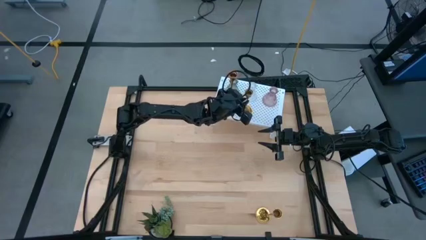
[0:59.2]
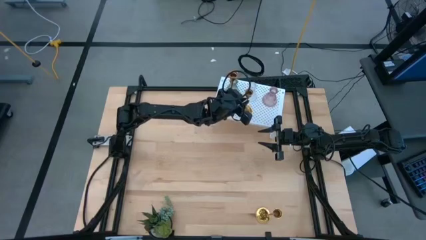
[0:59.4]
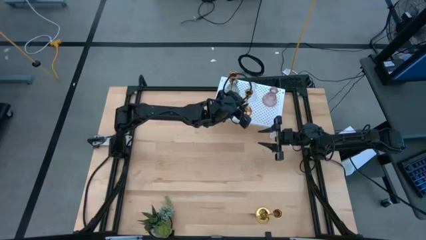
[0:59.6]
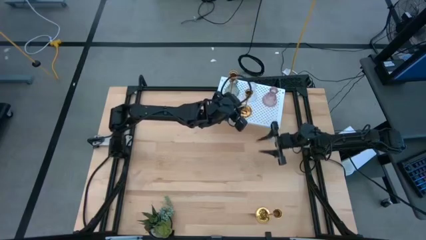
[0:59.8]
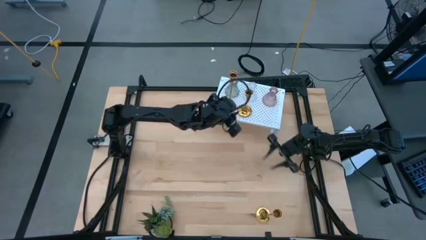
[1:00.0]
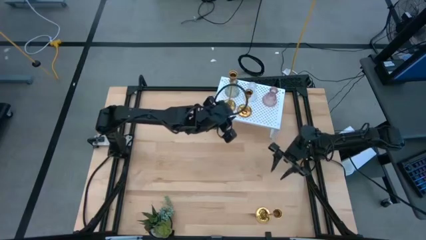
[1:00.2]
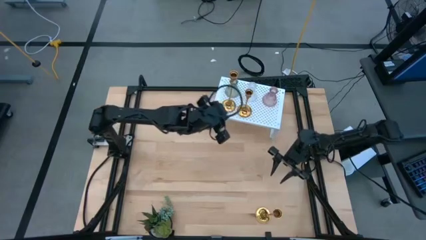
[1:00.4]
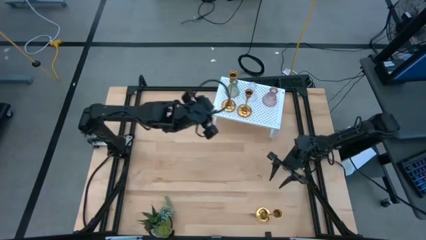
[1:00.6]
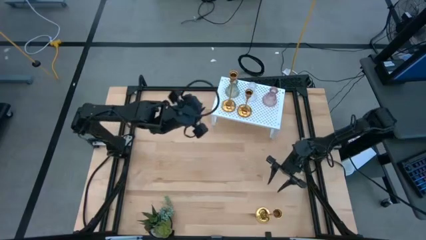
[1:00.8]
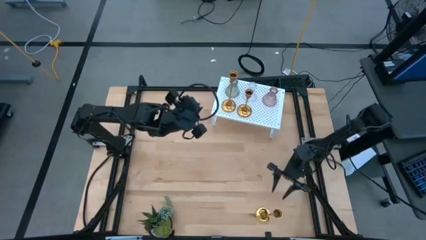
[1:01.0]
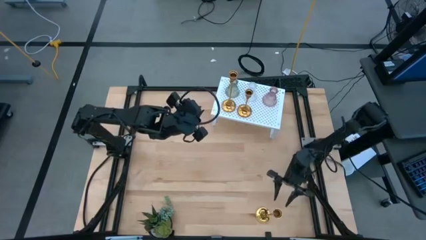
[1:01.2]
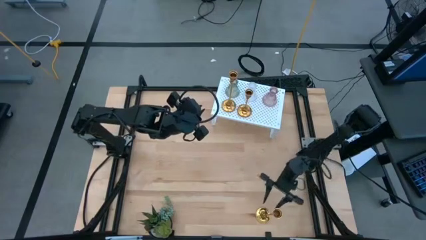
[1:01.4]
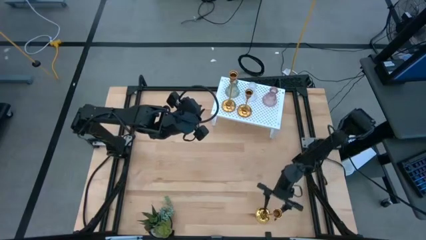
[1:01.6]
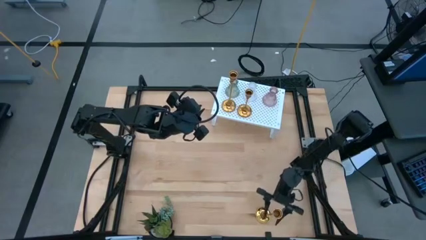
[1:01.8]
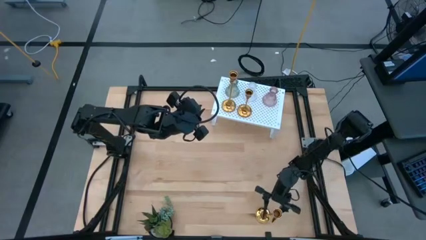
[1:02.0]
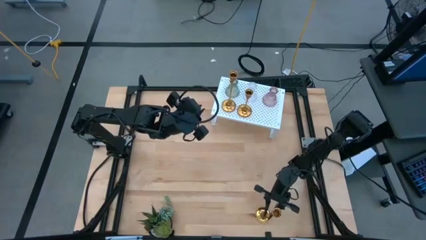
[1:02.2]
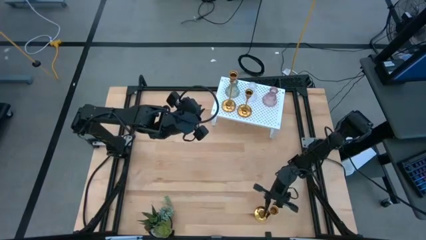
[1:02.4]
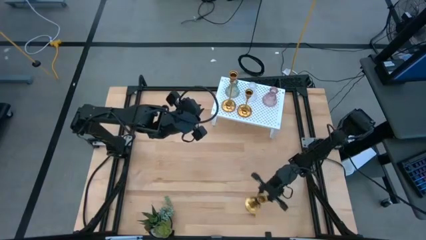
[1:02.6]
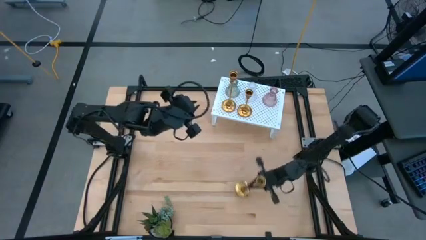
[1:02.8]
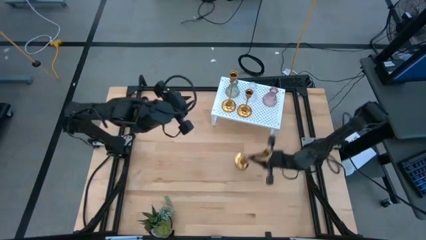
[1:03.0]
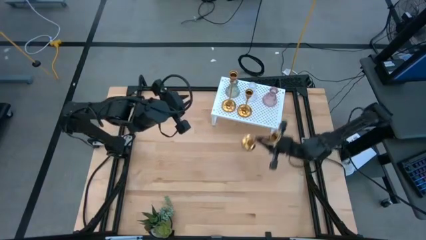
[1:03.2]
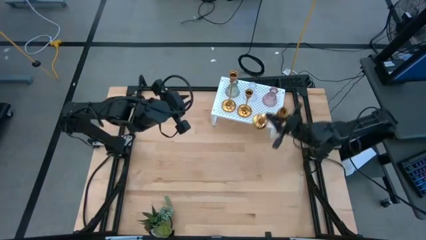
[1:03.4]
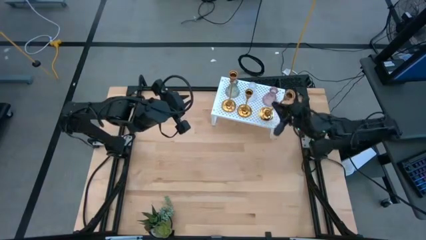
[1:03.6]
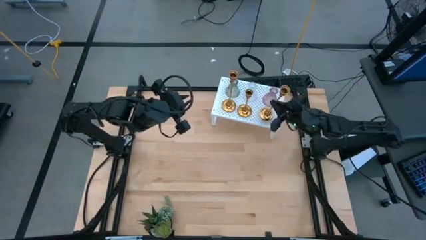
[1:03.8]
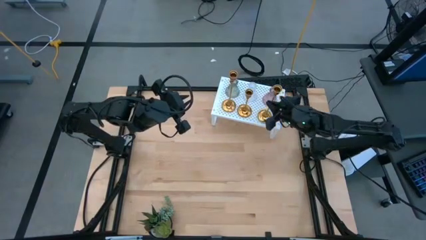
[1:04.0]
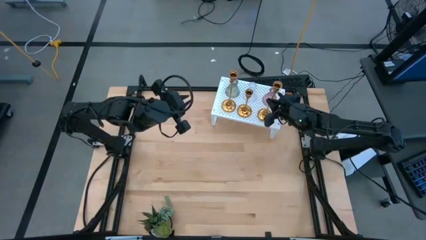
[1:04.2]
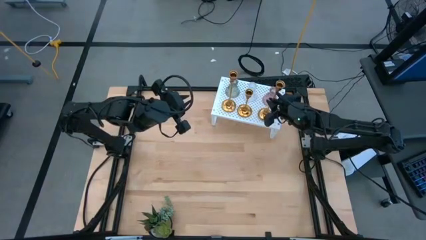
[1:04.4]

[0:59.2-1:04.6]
Task: Pick & Place candle stick holders
Align the gold candle holder with the other gold candle holder on the shelf

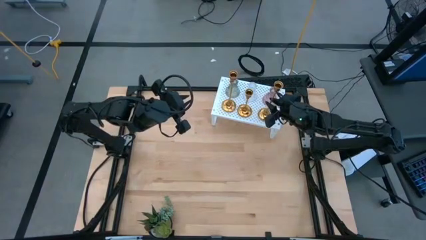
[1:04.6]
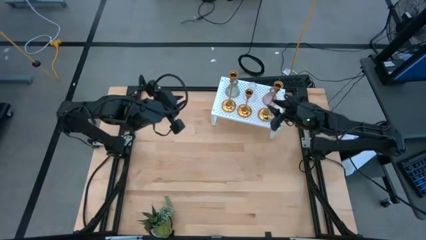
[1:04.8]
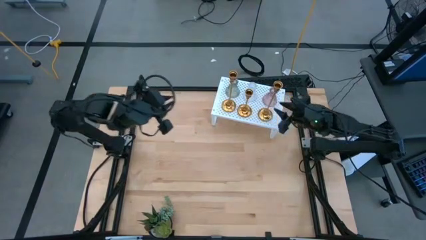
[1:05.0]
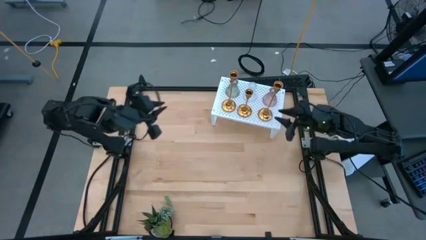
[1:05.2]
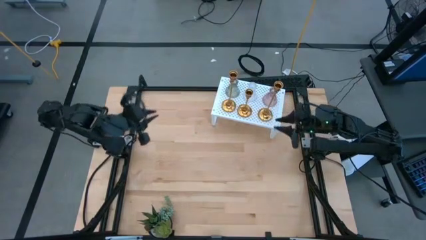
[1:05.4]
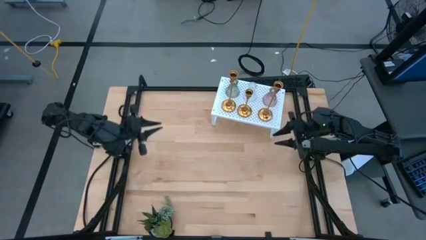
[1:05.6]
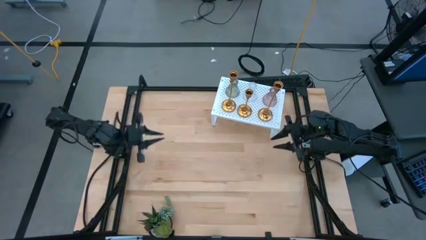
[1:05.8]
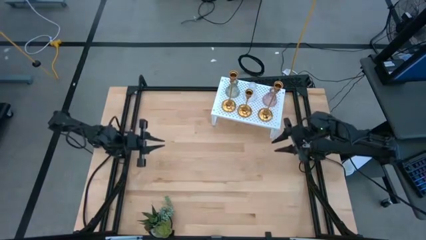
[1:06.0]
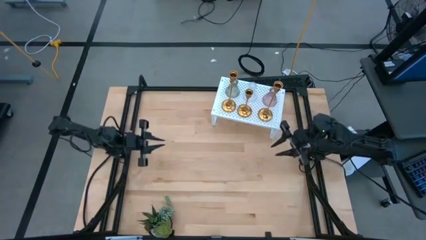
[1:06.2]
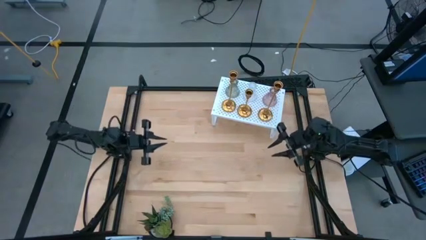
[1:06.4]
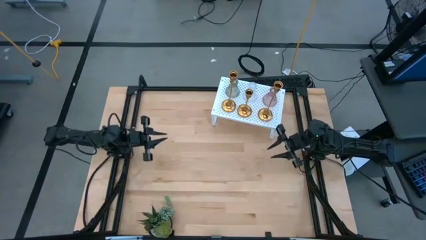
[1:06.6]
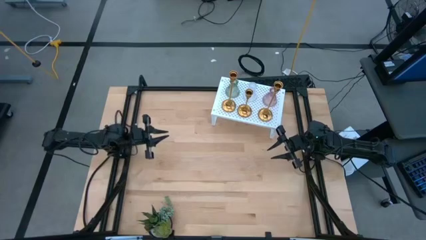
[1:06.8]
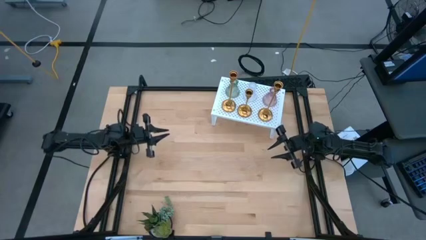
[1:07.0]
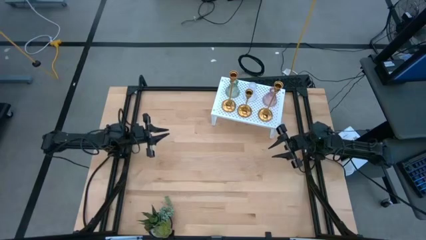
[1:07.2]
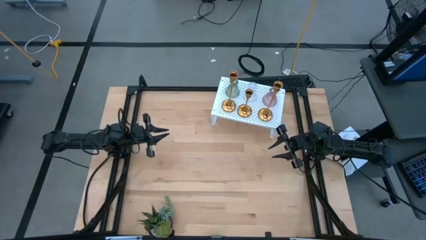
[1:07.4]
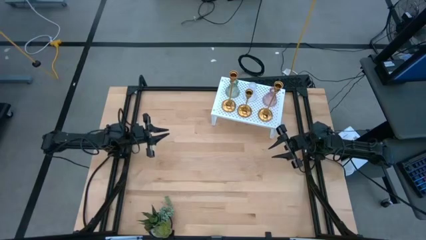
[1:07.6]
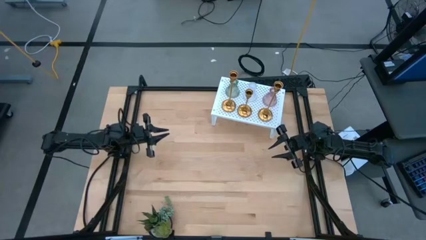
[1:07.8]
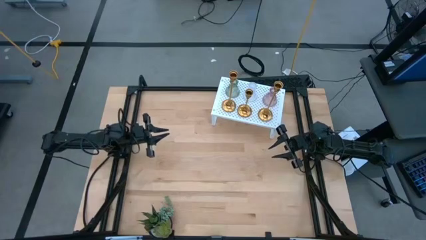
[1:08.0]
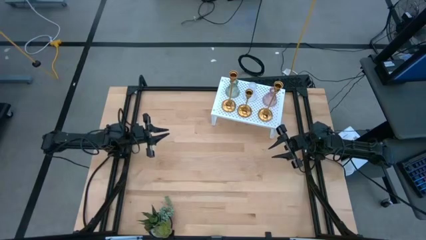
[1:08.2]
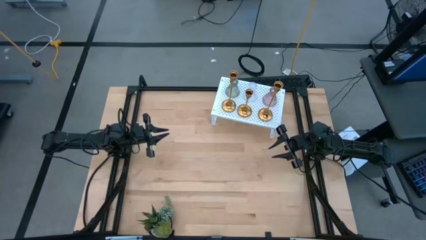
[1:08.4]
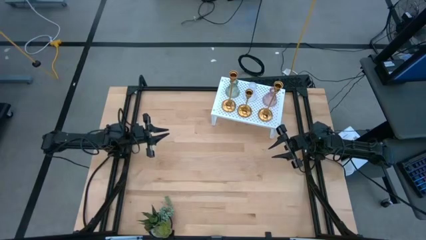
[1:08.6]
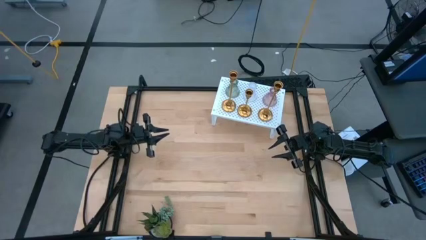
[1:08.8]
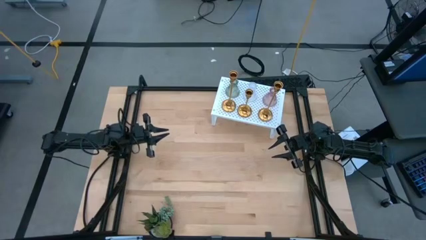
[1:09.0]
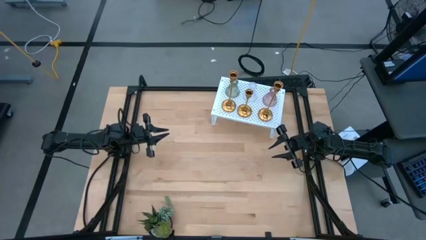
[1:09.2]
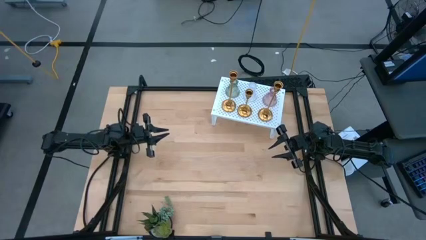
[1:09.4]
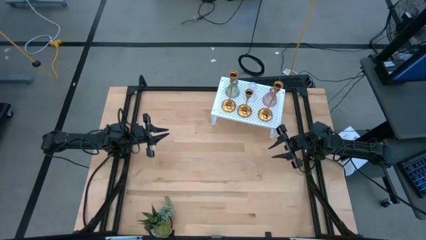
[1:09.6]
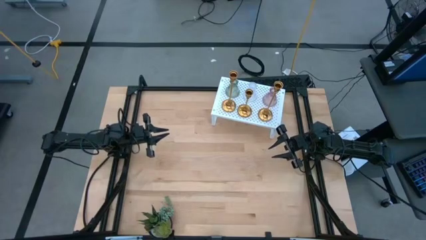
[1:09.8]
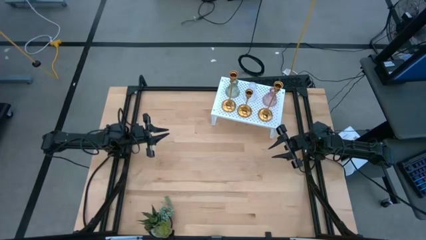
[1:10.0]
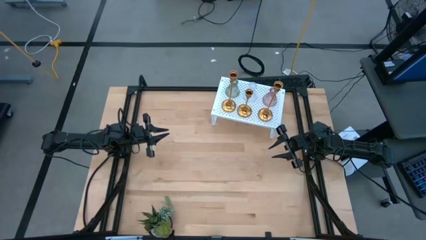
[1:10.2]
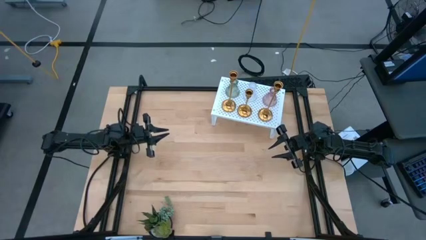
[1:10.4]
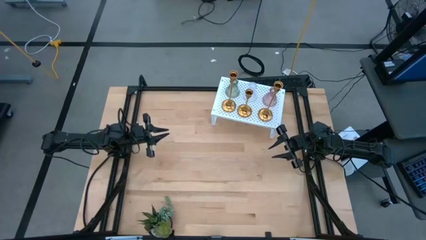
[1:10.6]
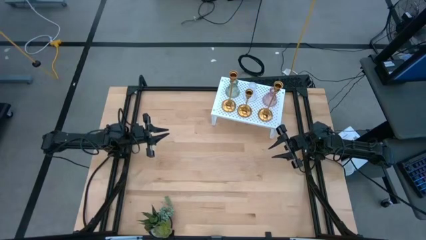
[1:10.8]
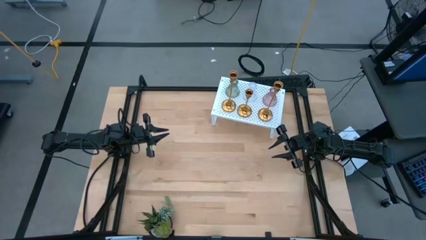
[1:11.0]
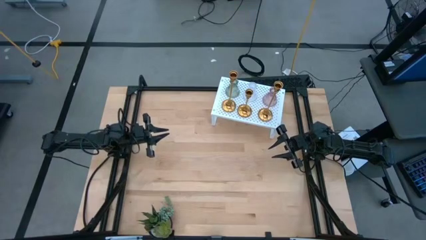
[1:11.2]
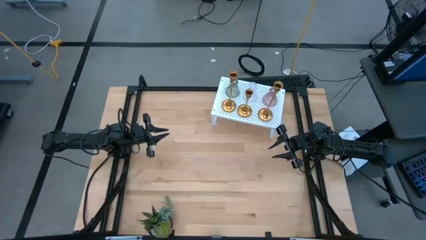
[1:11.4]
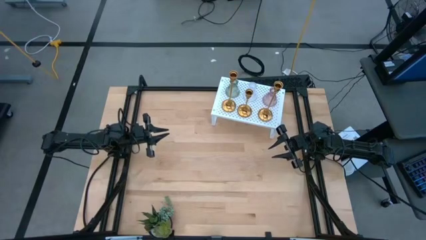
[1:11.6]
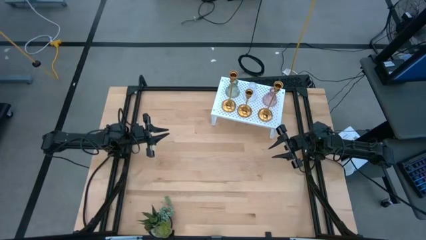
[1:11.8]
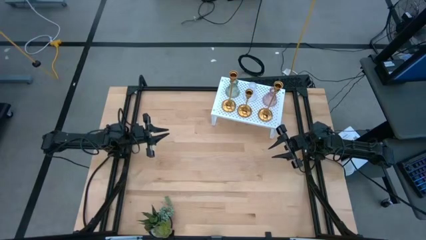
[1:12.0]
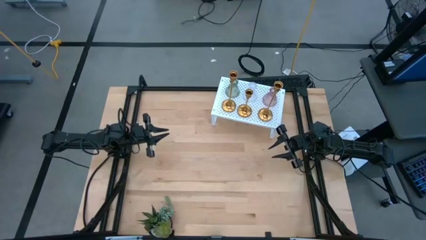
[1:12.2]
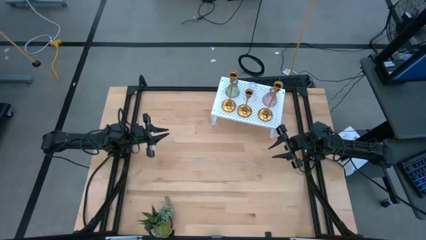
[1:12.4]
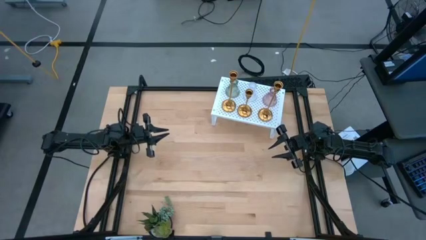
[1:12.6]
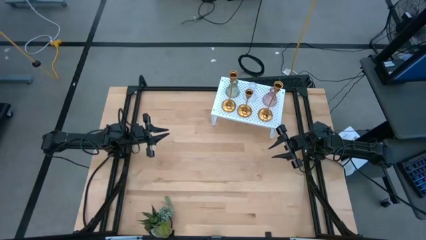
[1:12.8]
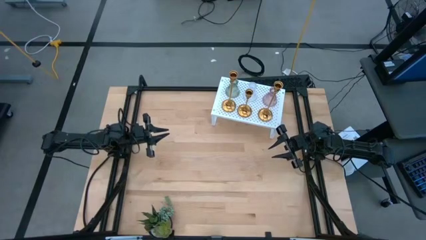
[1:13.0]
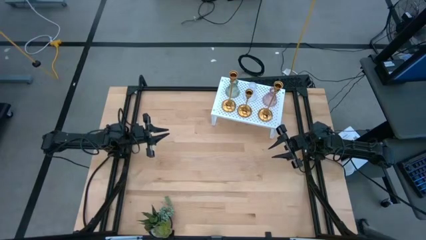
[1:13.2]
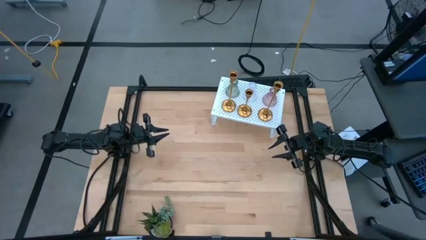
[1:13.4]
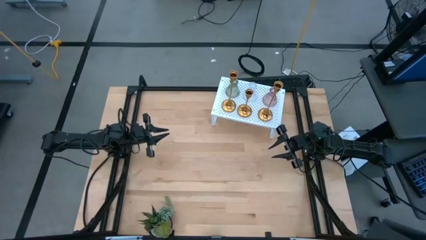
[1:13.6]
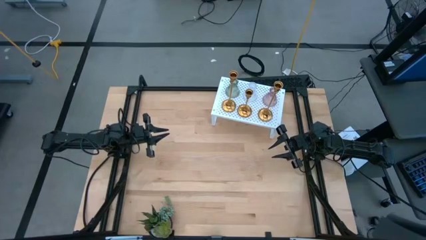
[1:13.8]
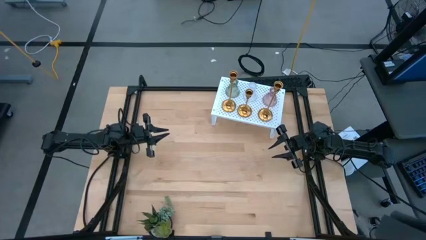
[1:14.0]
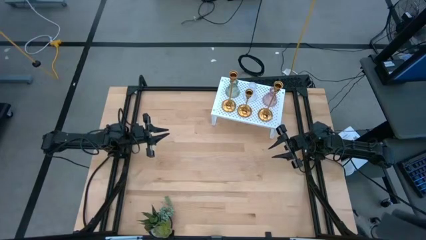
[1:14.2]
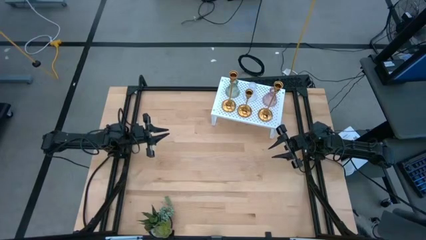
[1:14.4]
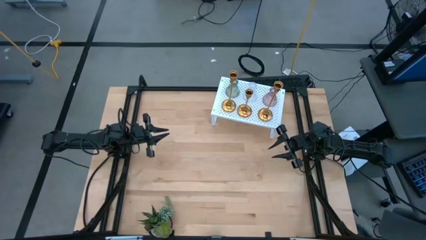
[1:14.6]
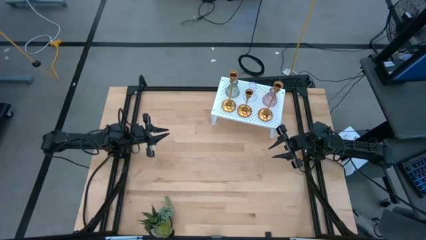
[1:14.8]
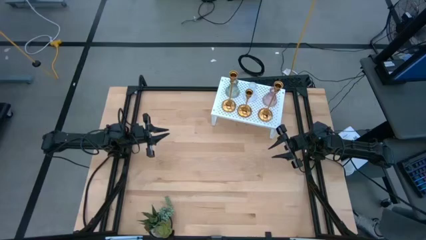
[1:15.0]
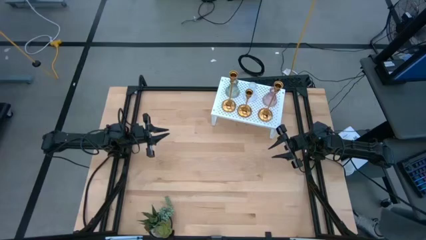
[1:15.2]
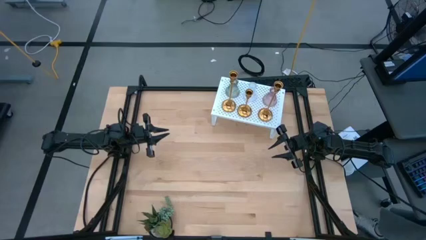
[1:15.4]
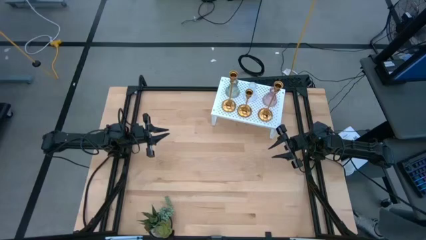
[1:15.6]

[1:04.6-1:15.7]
Return to Home Position
